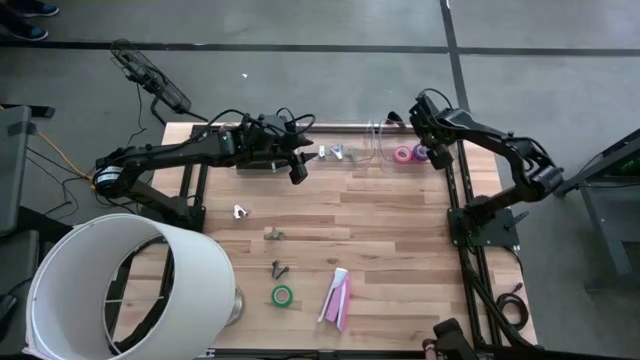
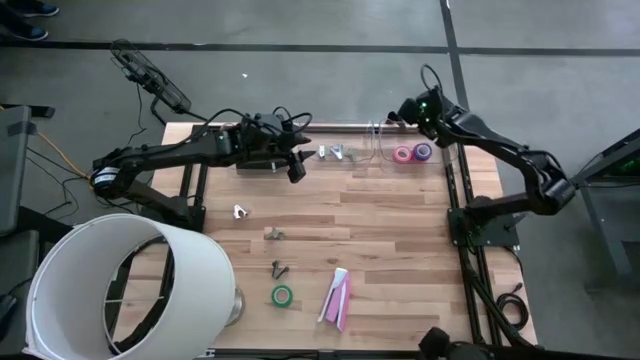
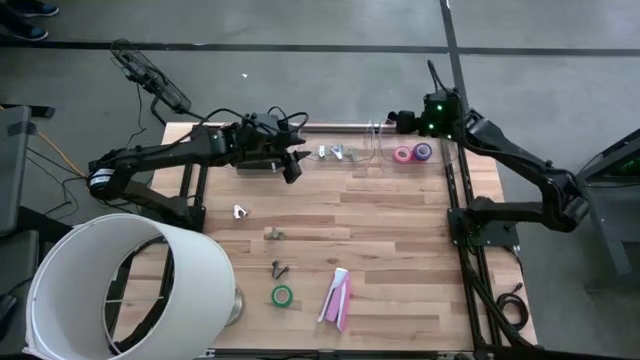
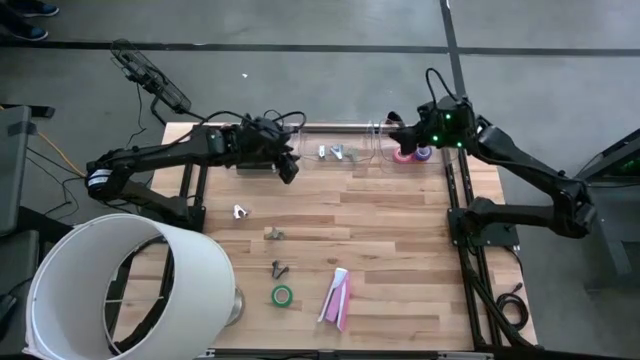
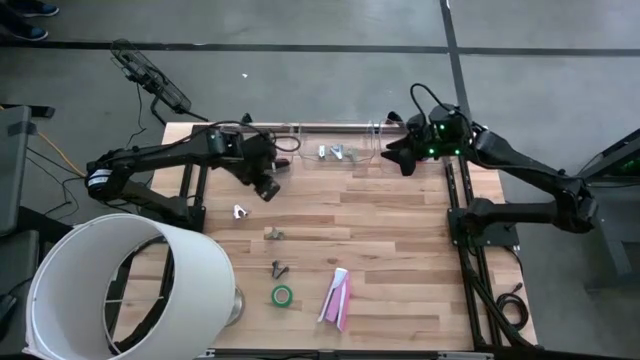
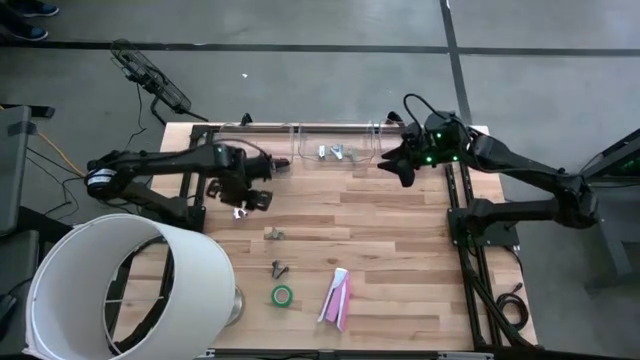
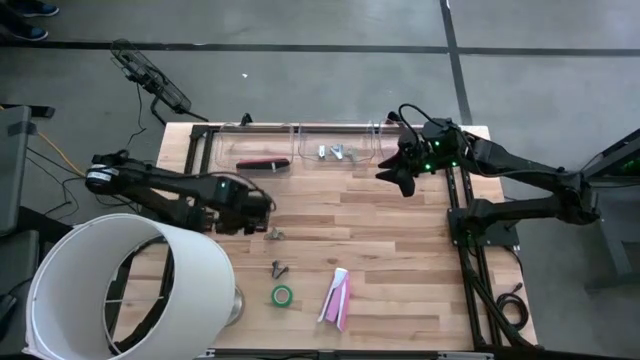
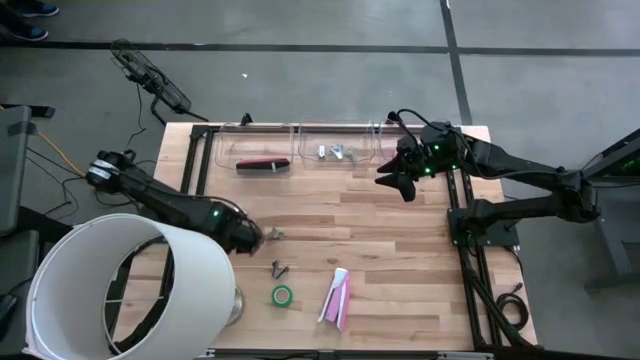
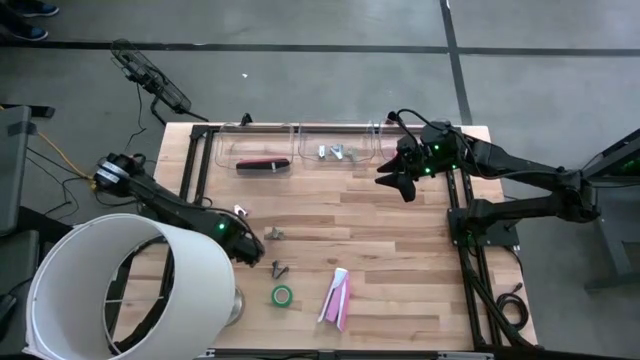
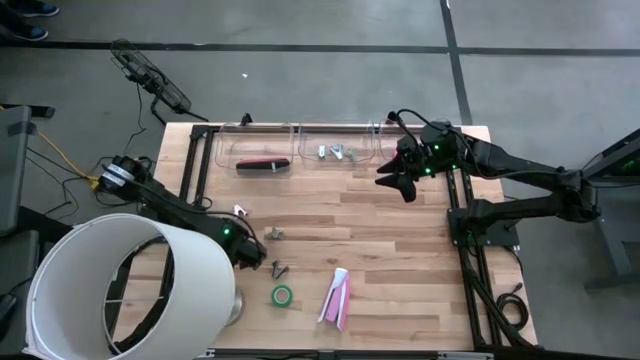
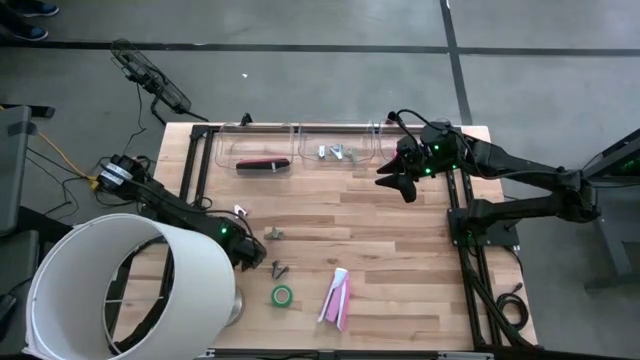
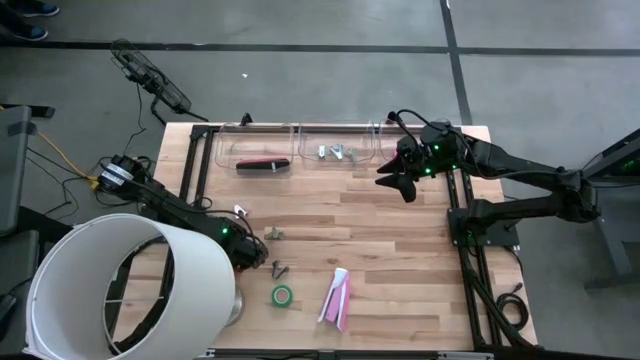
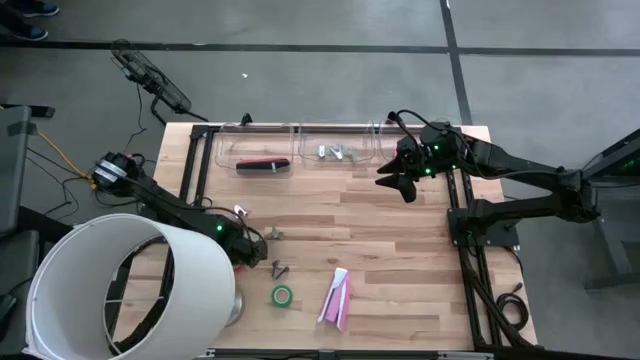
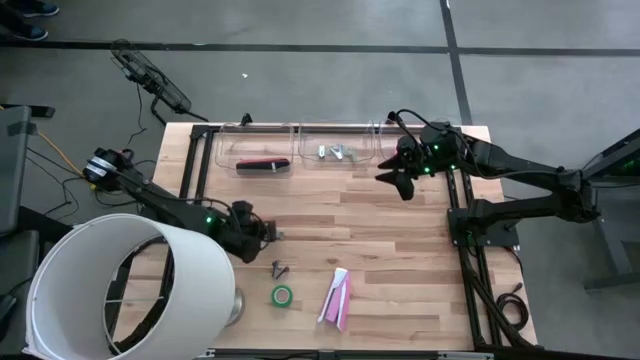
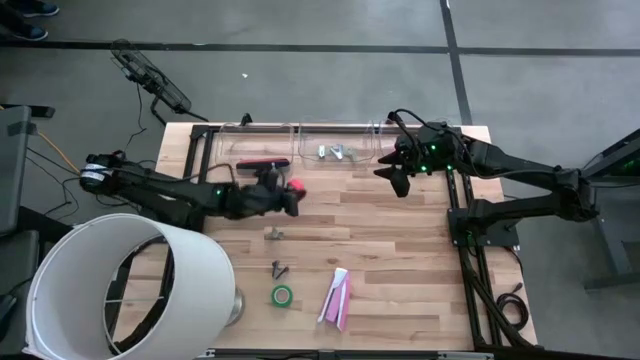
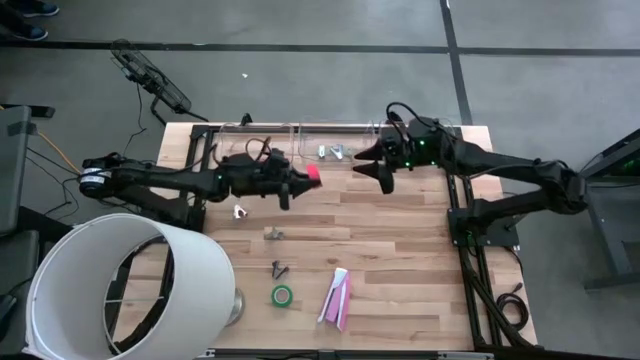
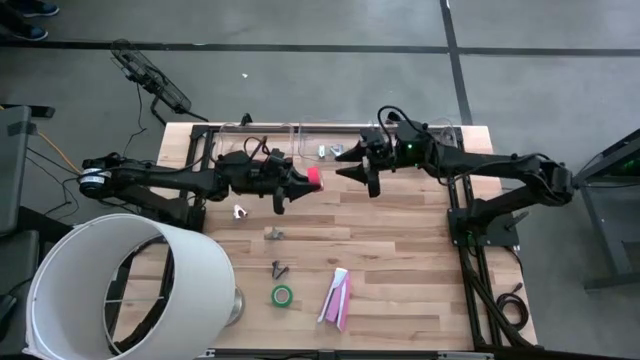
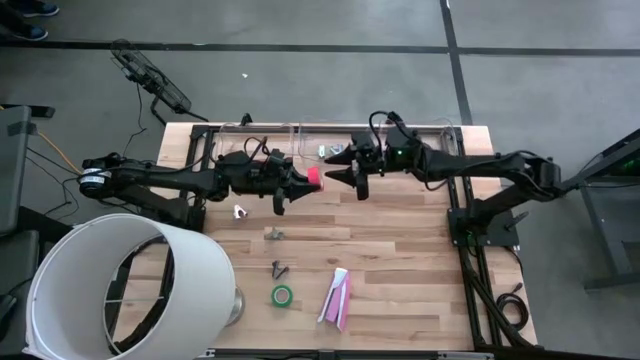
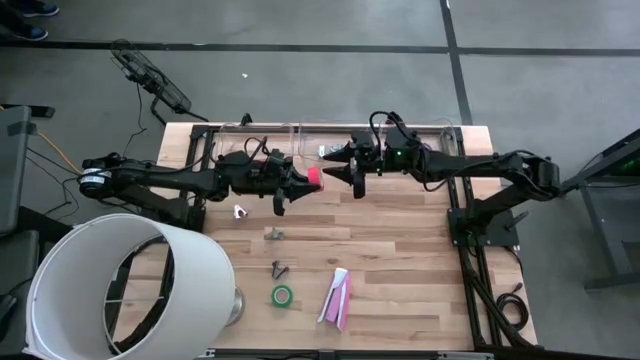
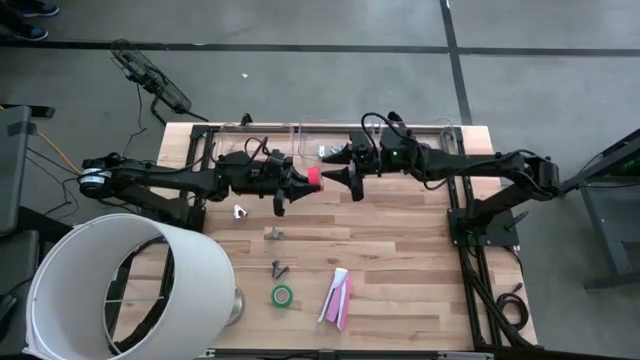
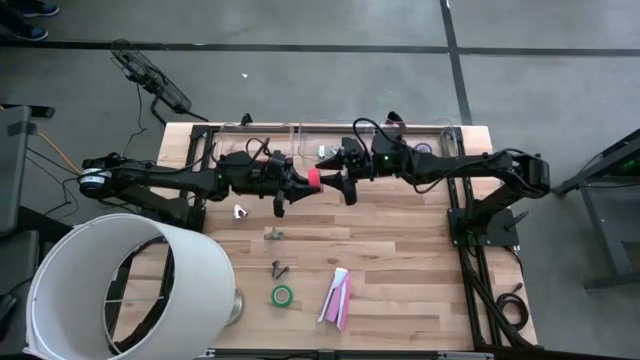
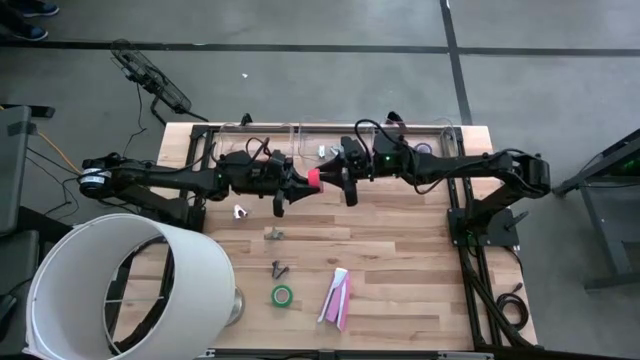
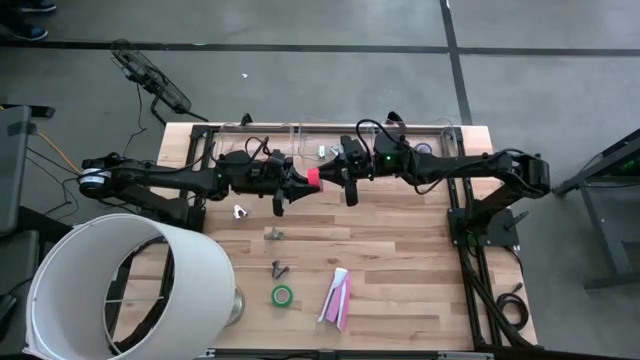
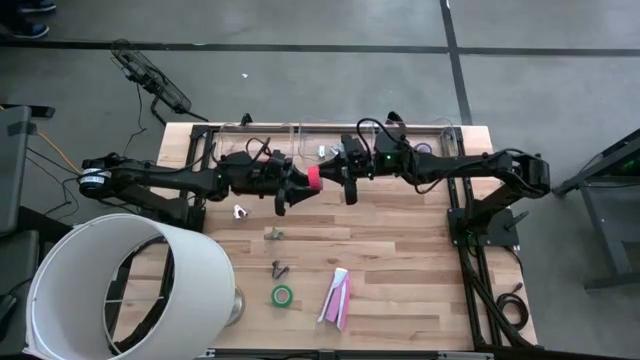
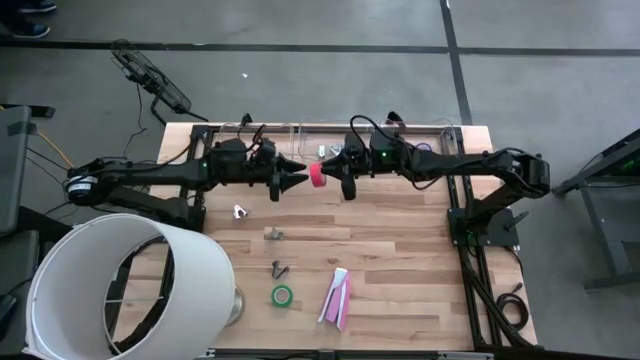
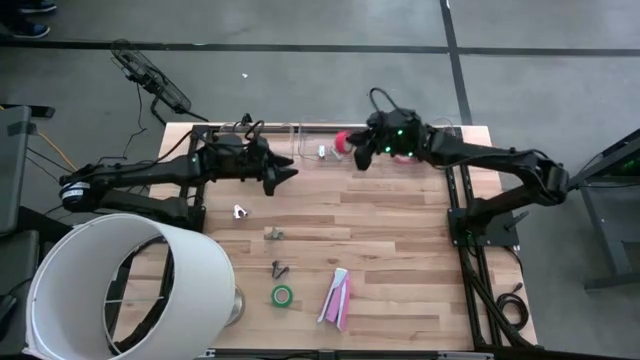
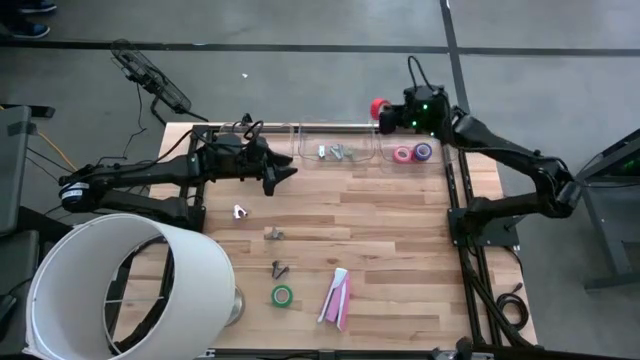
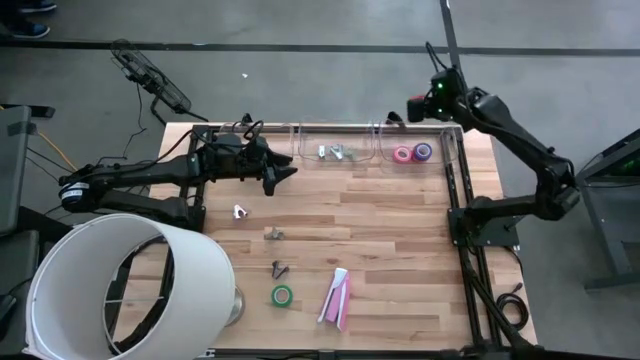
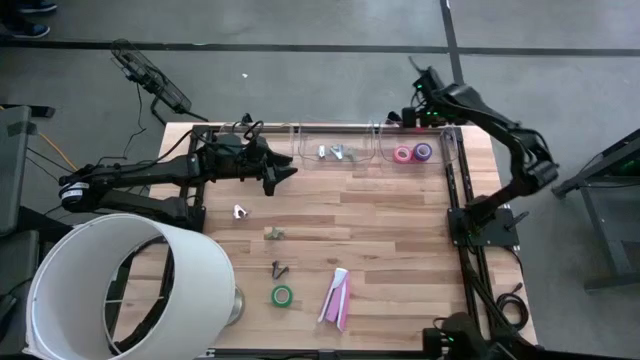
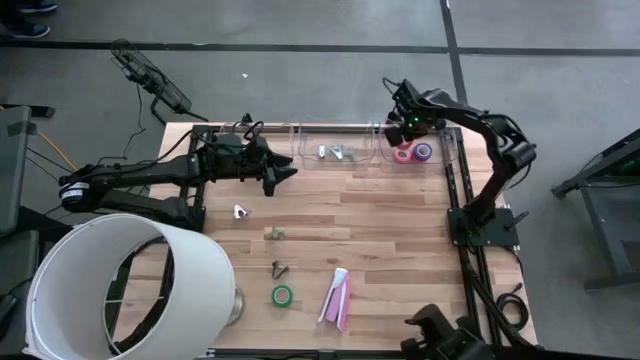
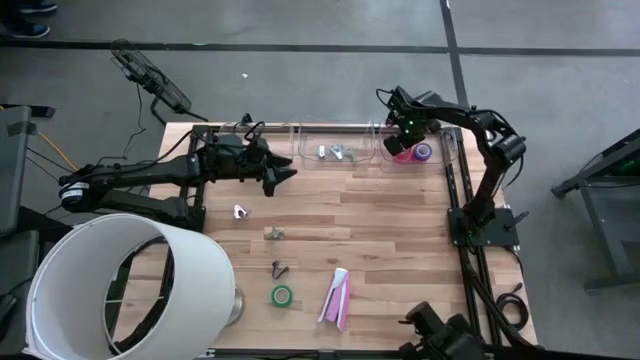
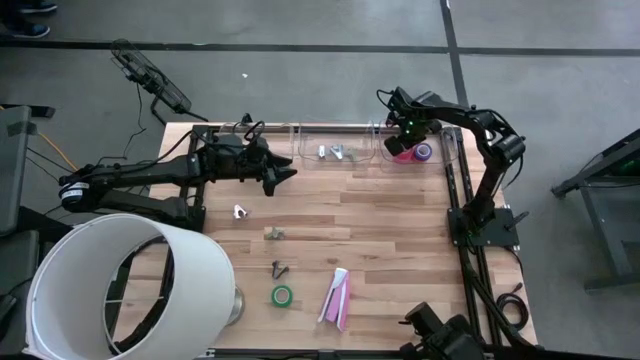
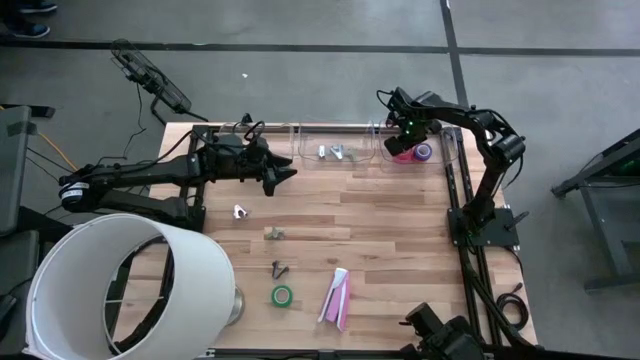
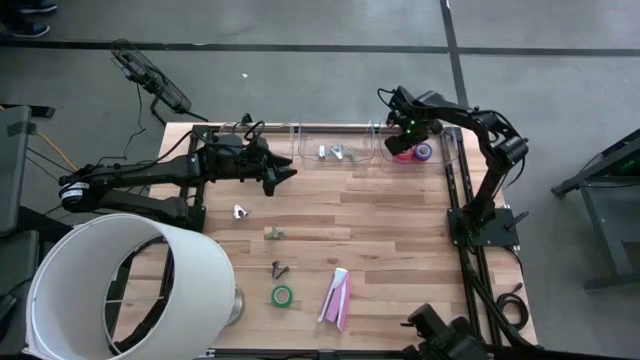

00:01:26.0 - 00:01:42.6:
Task: Pick and place Stapler, Stapler remover, tape
Put the red tape into the right transparent bin
